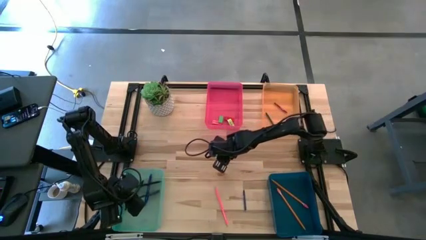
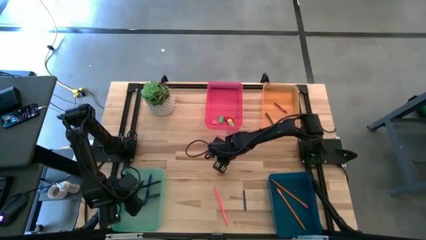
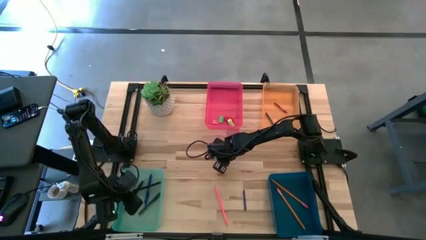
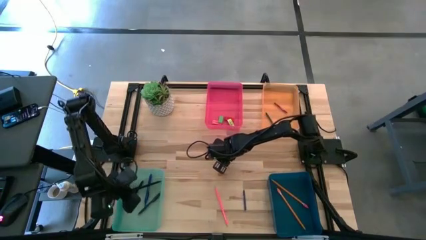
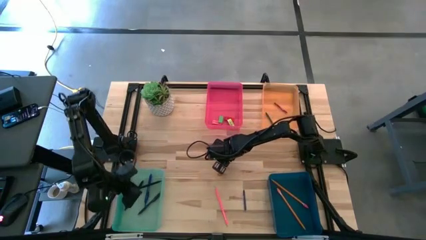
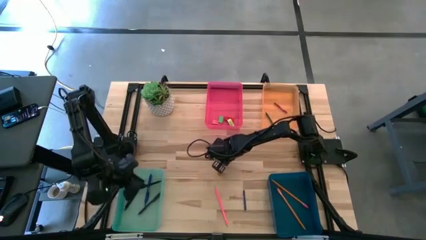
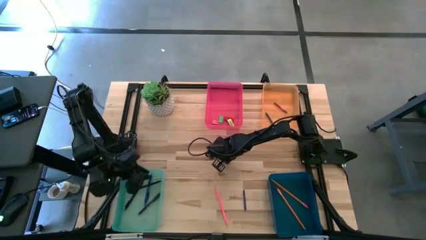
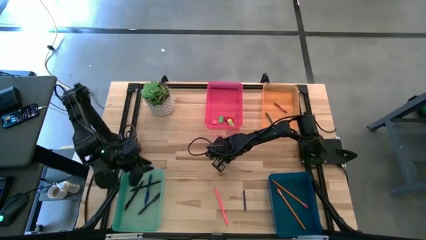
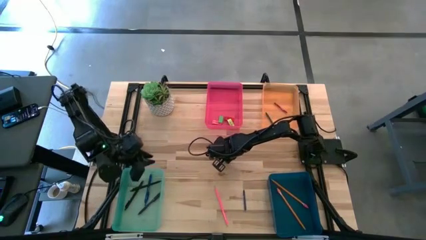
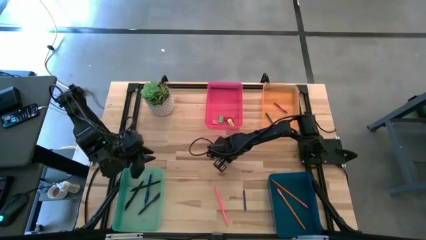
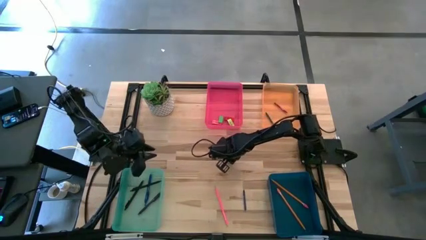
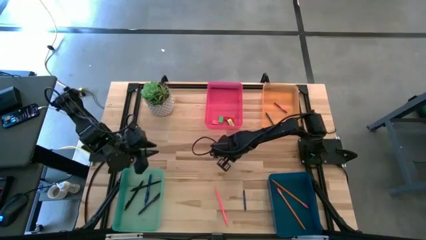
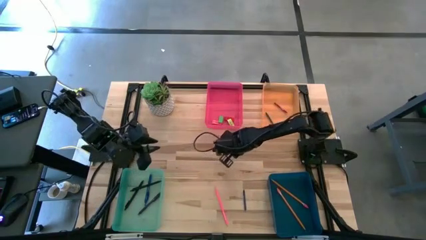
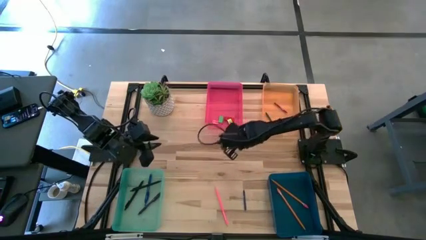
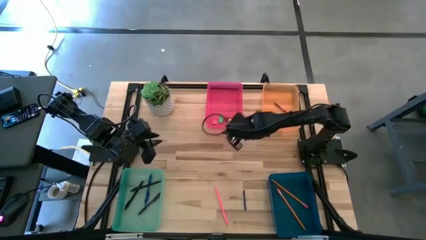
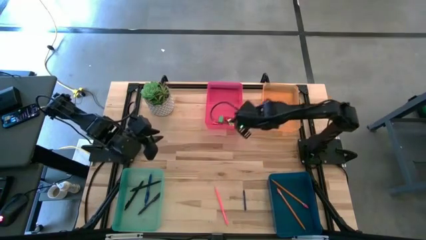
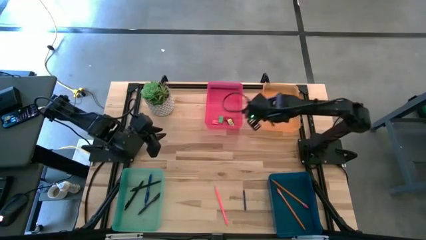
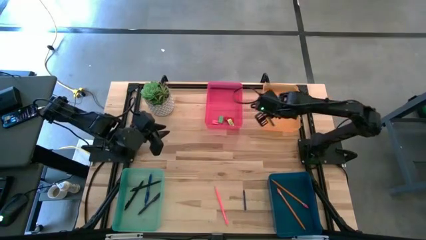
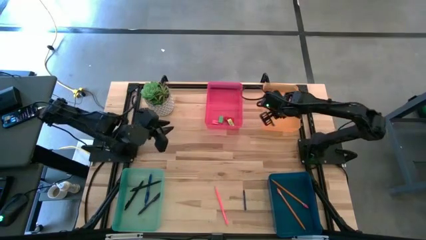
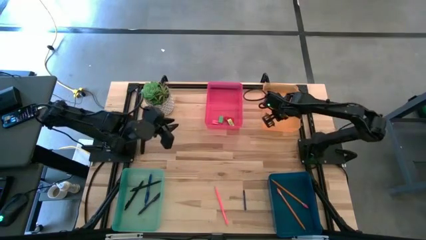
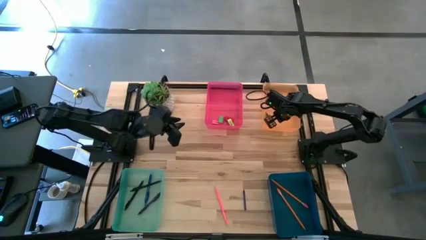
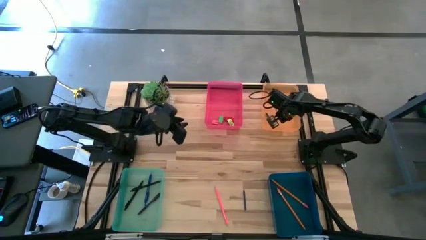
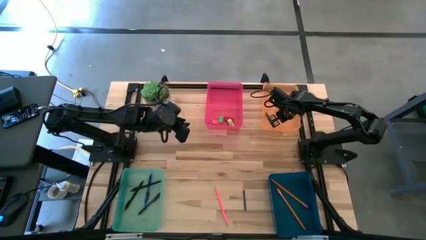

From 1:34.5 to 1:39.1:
Task: Sort crayons/erasers/pens/pencils in bins
Put the blue crayon into the orange bin

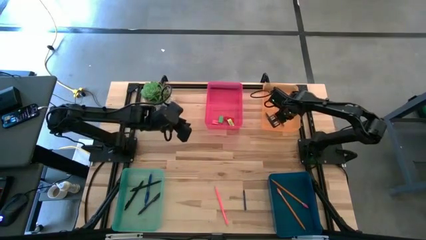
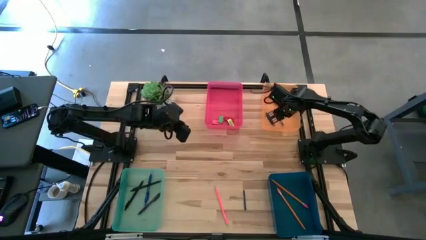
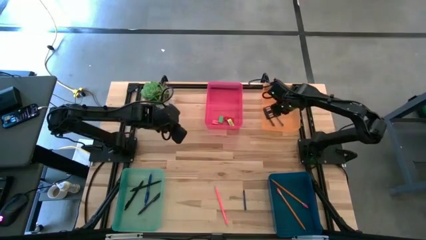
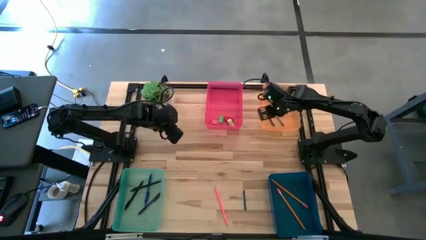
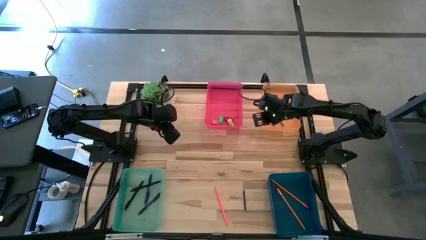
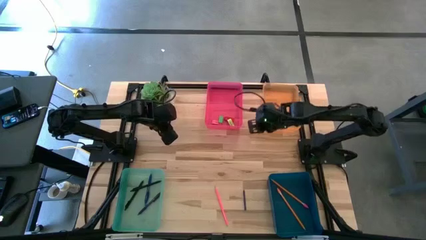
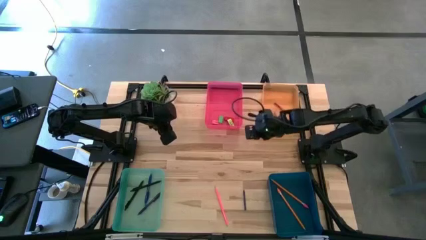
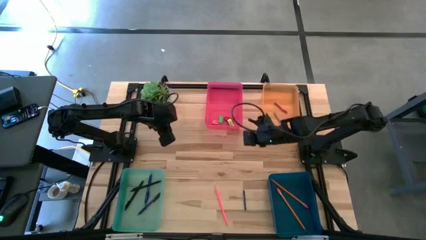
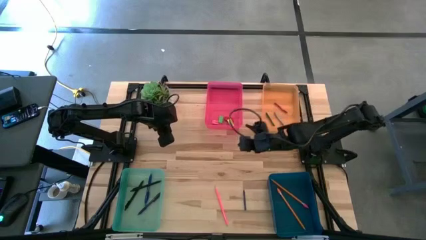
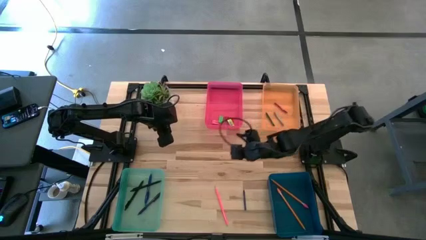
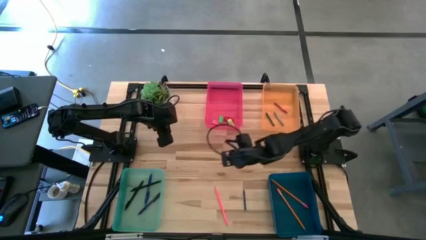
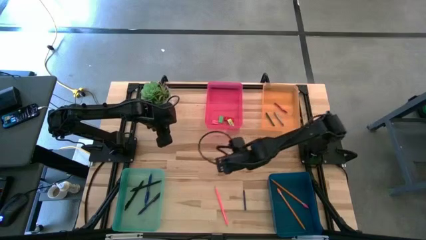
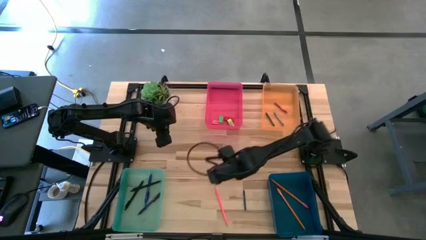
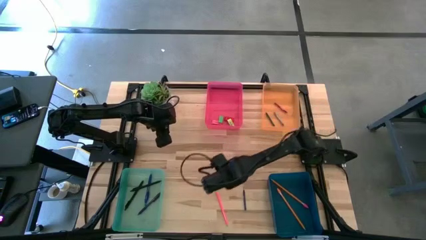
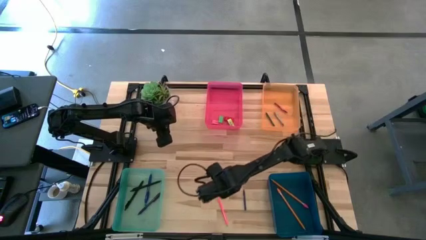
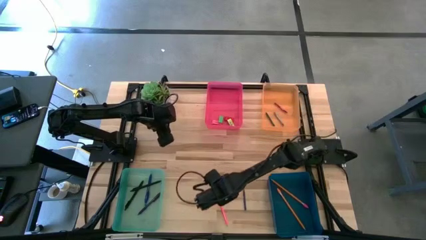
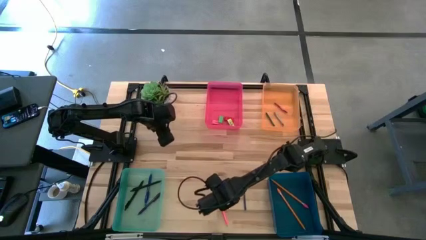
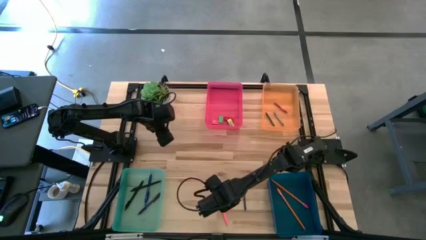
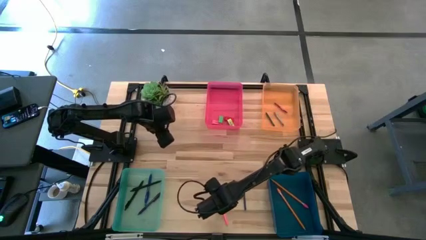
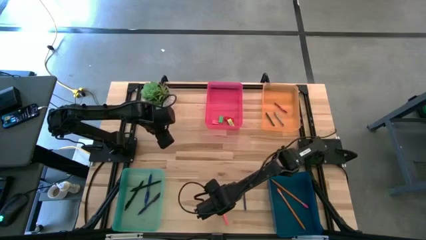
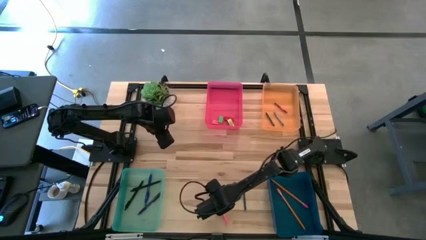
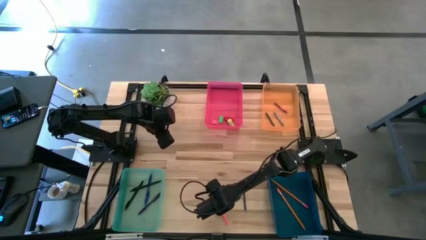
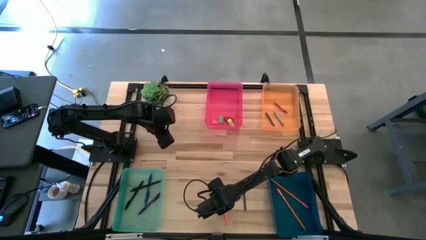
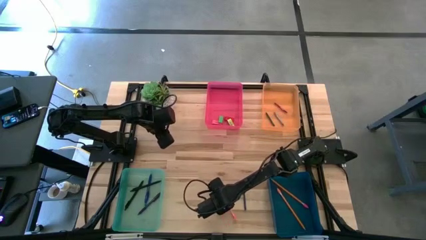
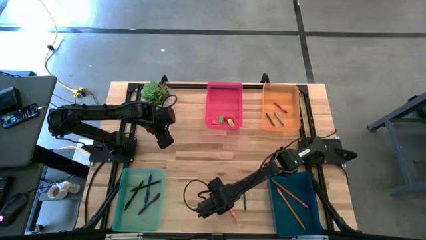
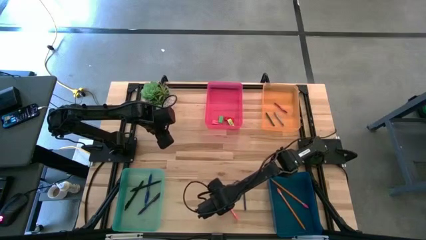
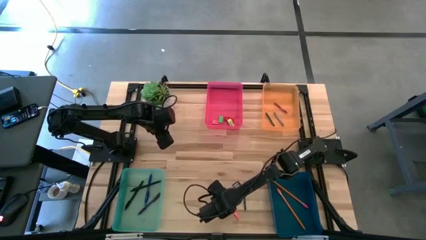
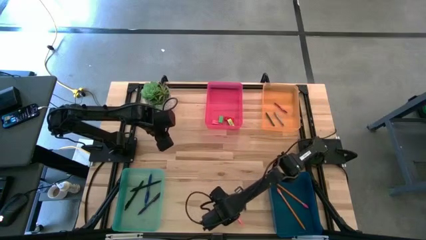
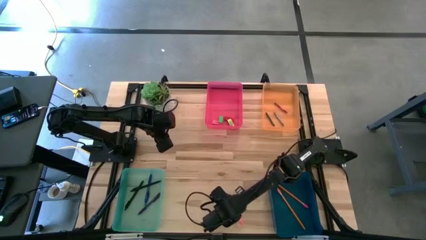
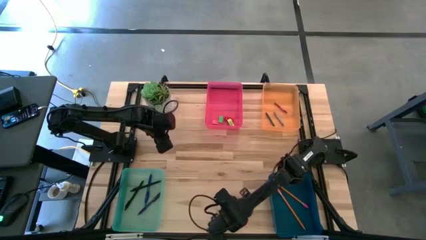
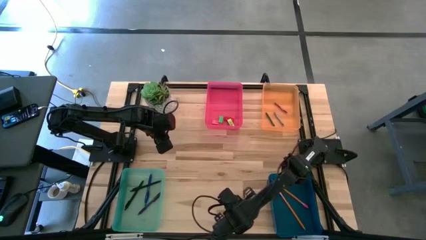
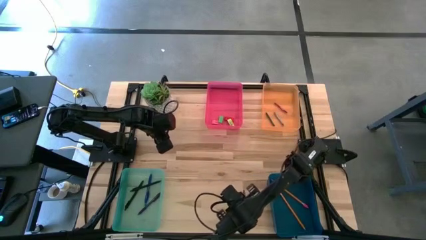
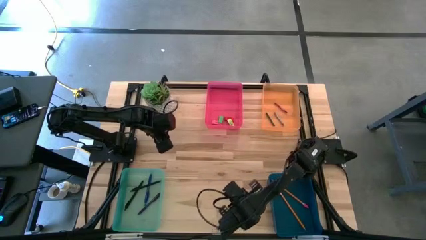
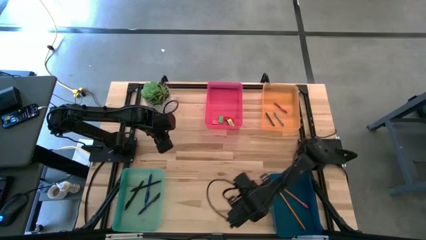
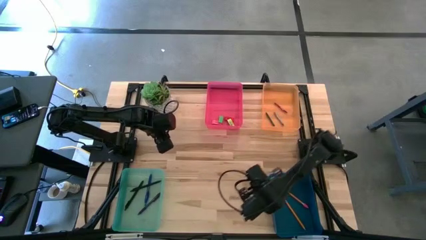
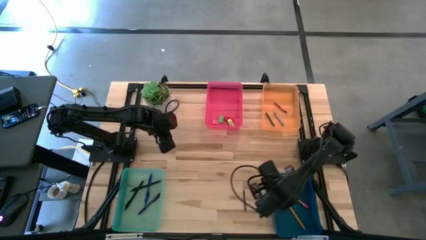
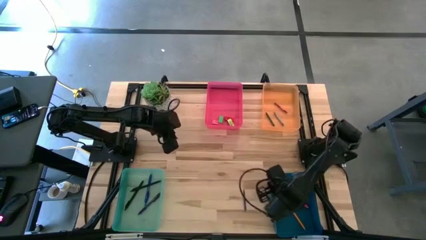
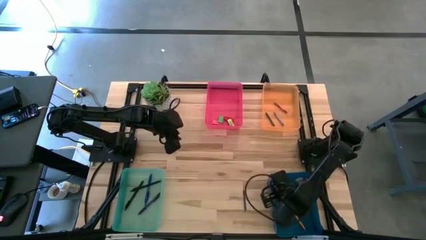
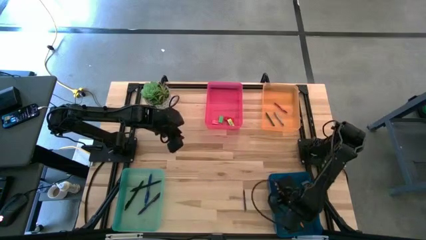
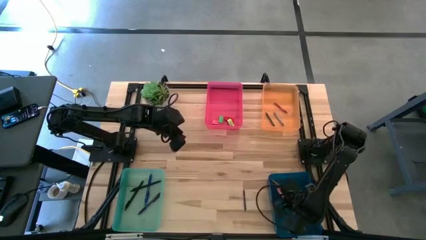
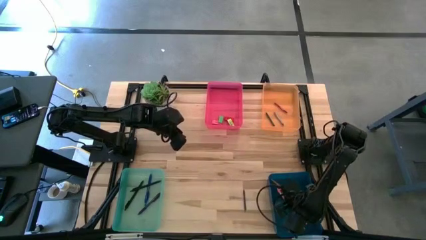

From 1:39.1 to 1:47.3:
Put the pink color pencil into the blue bin

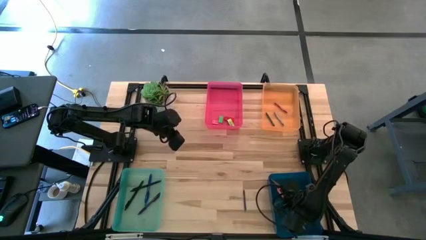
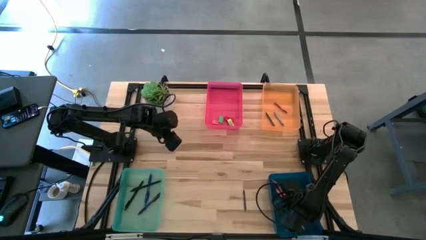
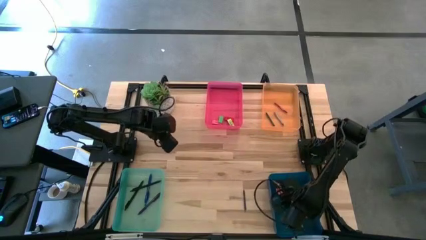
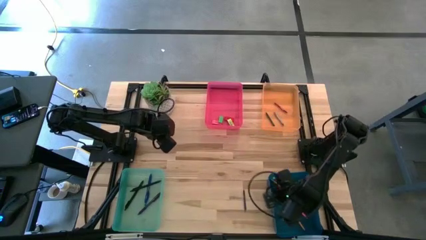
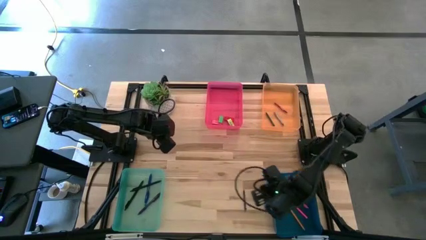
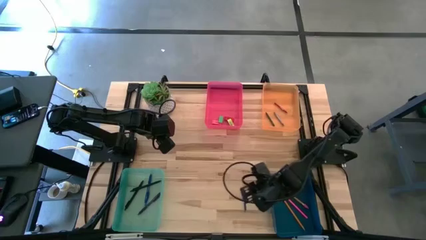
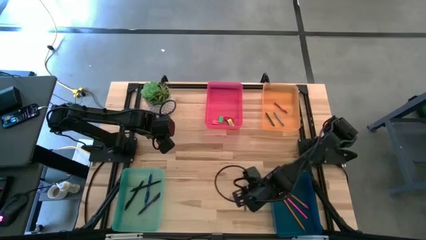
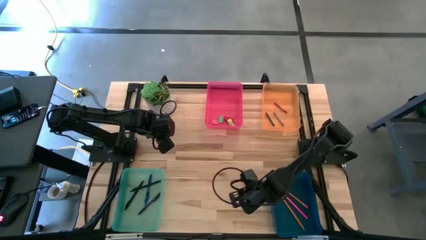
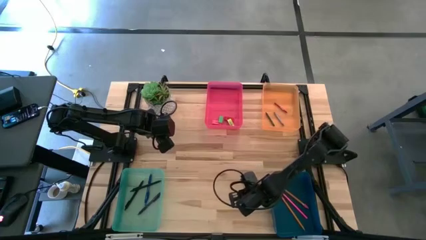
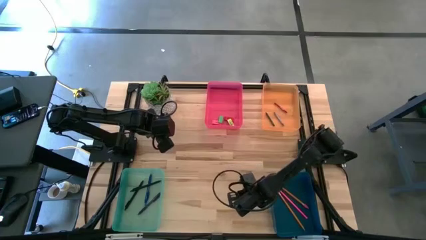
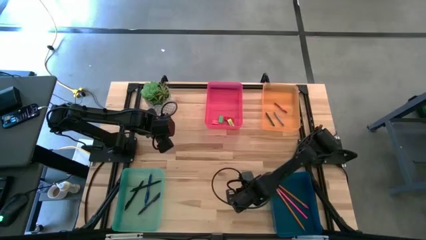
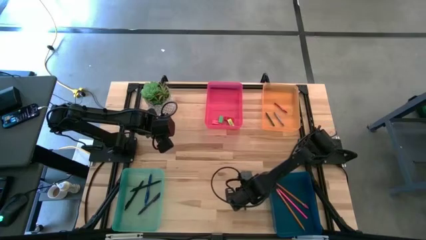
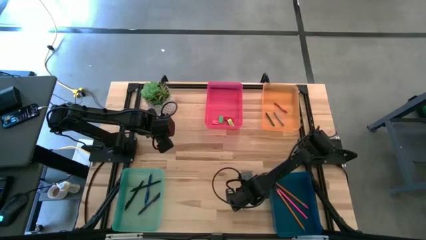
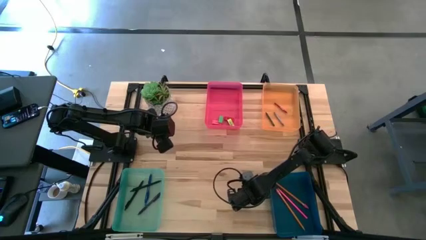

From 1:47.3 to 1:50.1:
Put the blue crayon into the orange bin

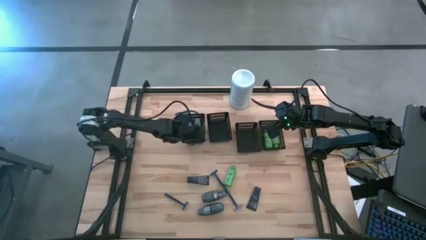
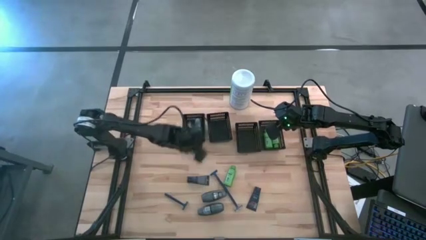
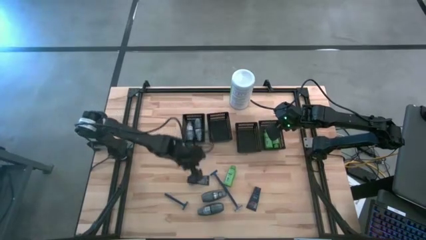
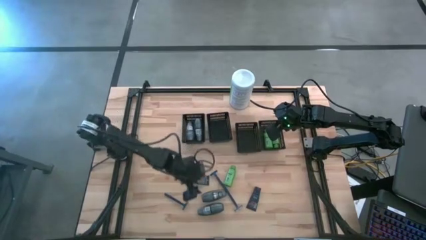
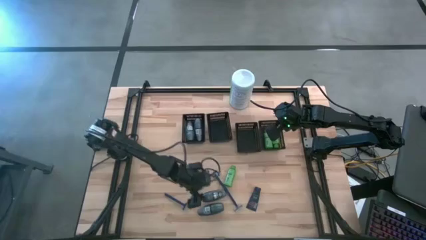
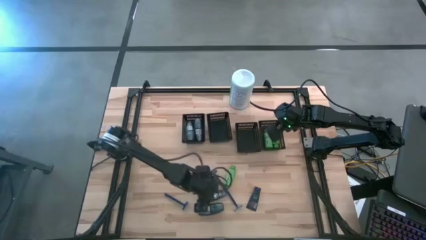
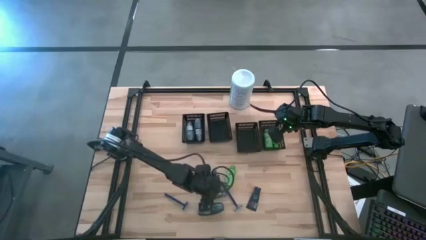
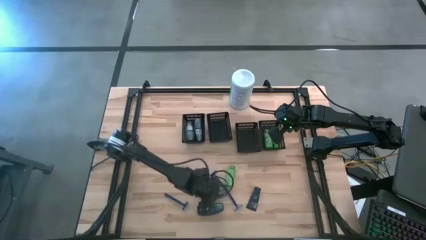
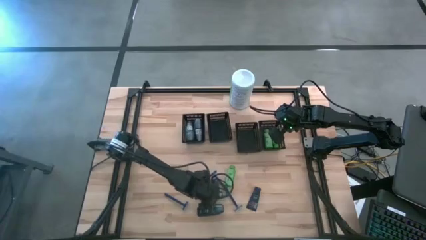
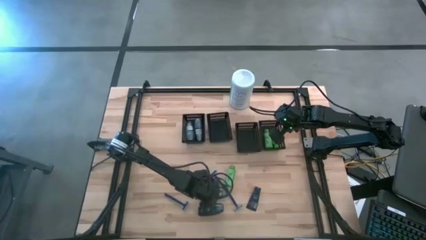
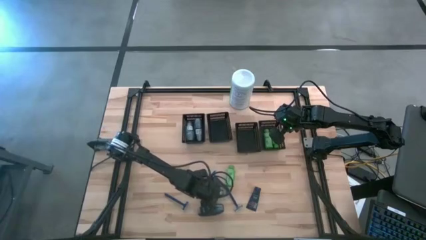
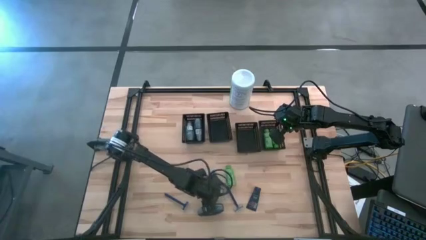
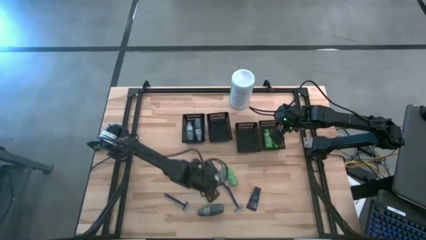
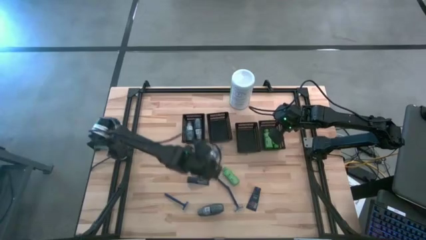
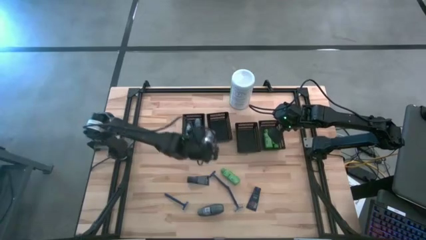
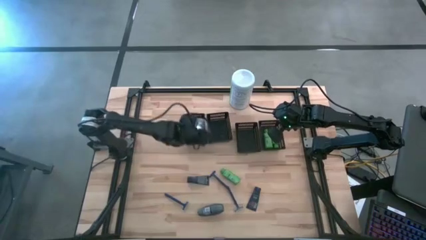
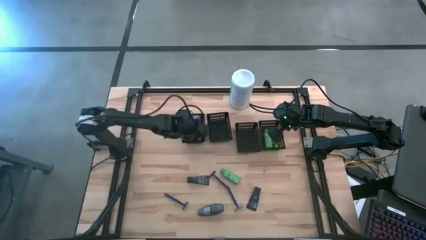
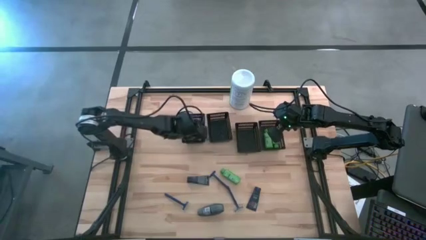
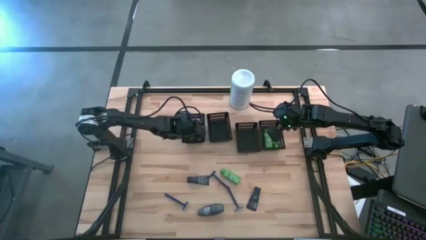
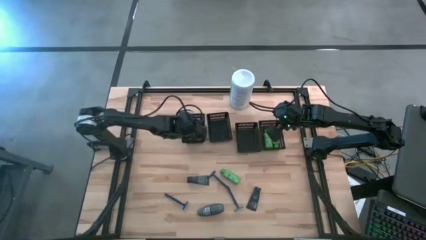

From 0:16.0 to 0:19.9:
Task: Pick & Place Travel size toiletries
Put the black deodorant into the left black bin
